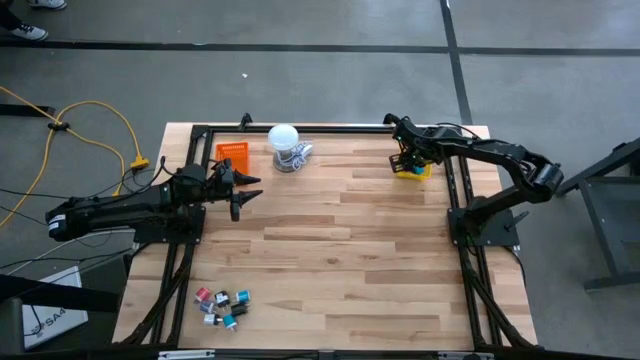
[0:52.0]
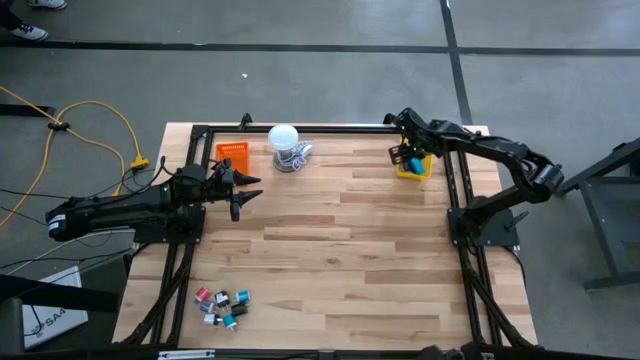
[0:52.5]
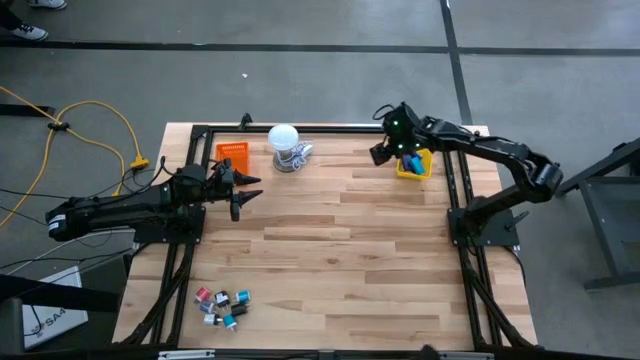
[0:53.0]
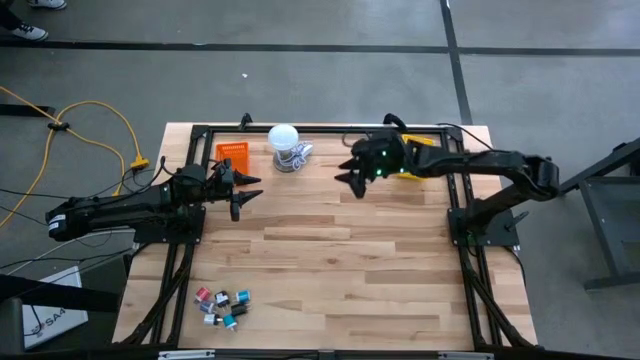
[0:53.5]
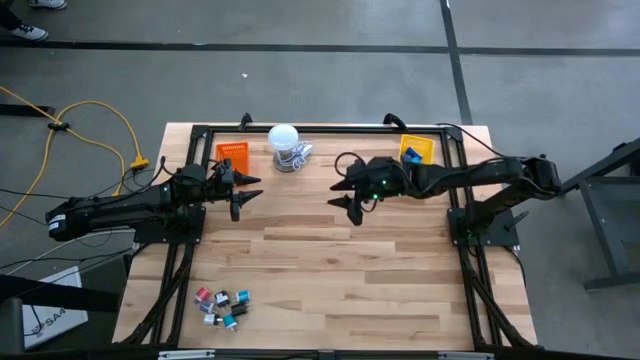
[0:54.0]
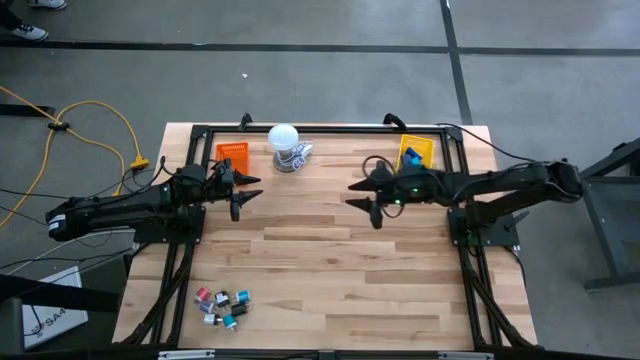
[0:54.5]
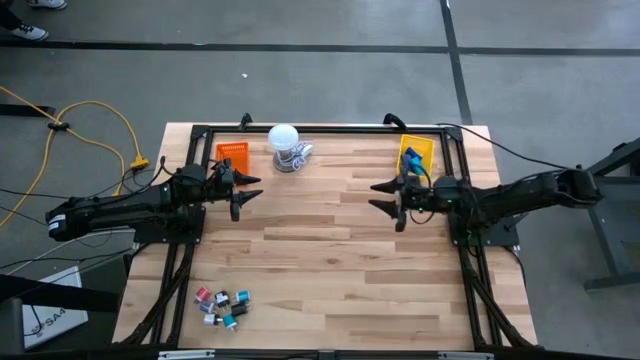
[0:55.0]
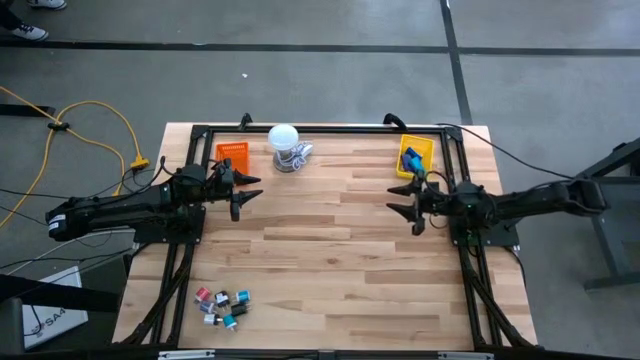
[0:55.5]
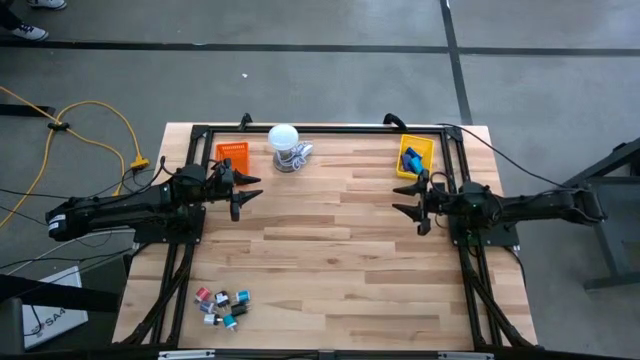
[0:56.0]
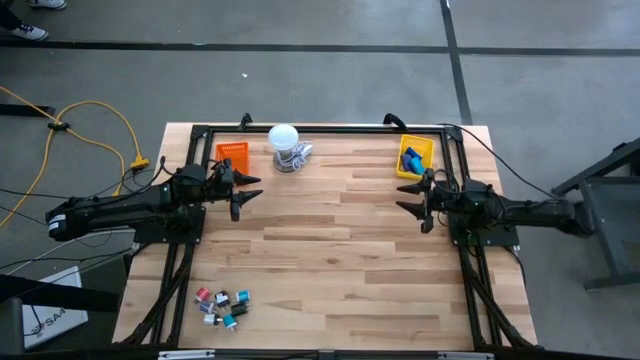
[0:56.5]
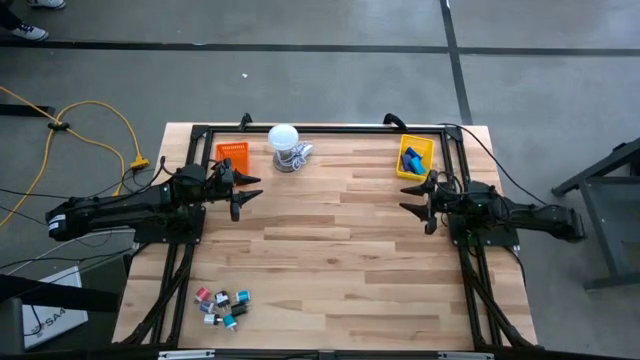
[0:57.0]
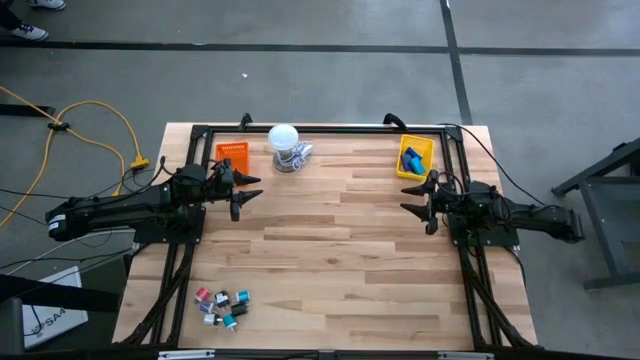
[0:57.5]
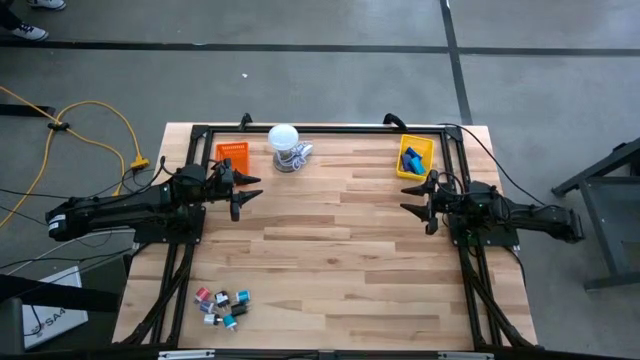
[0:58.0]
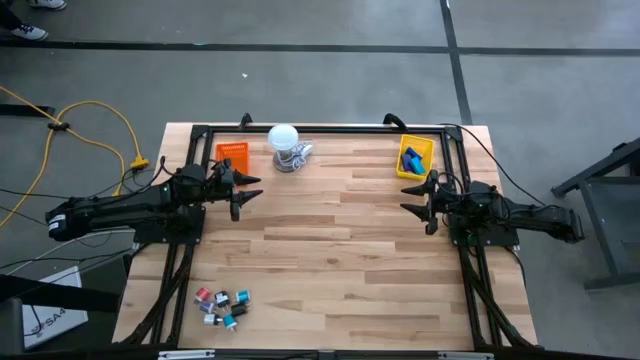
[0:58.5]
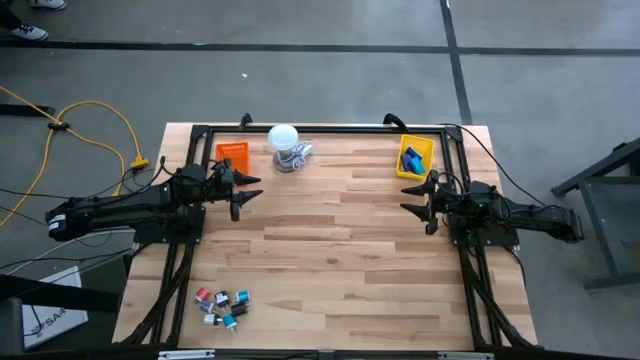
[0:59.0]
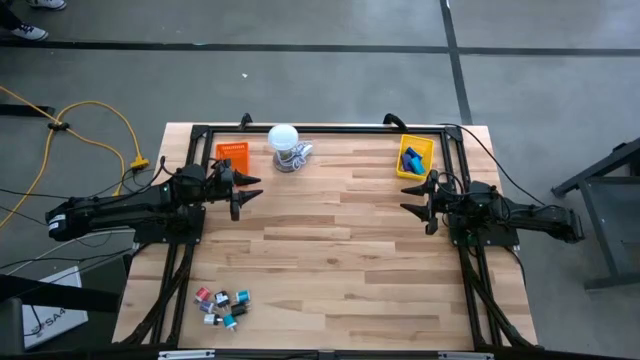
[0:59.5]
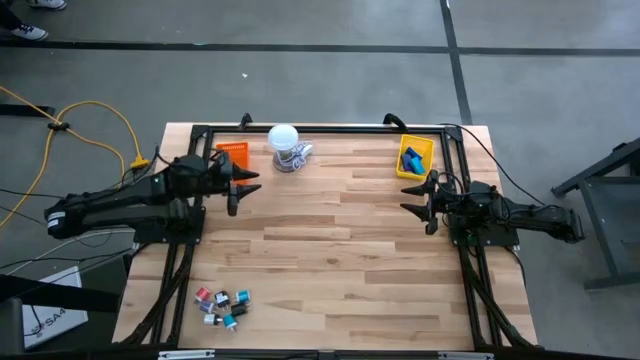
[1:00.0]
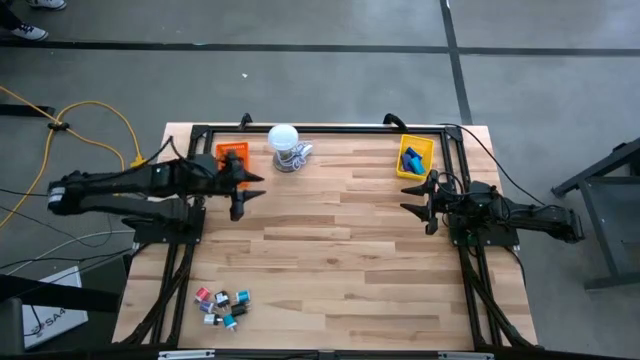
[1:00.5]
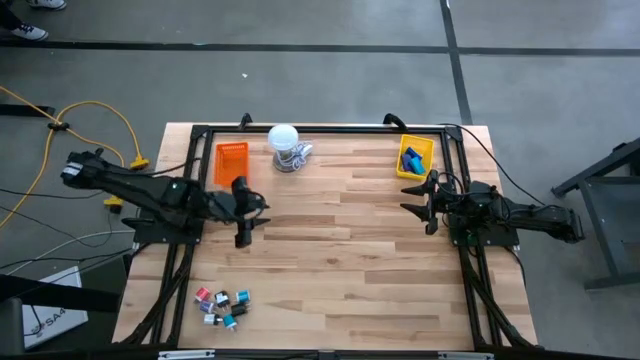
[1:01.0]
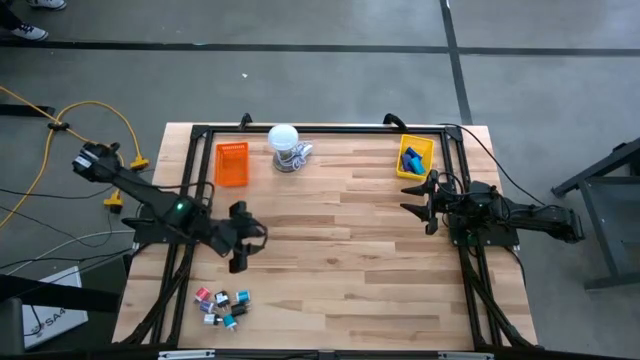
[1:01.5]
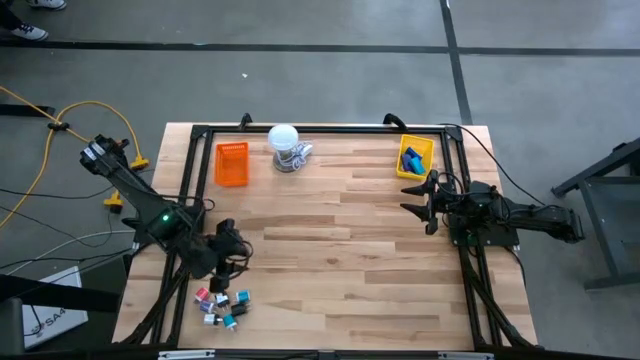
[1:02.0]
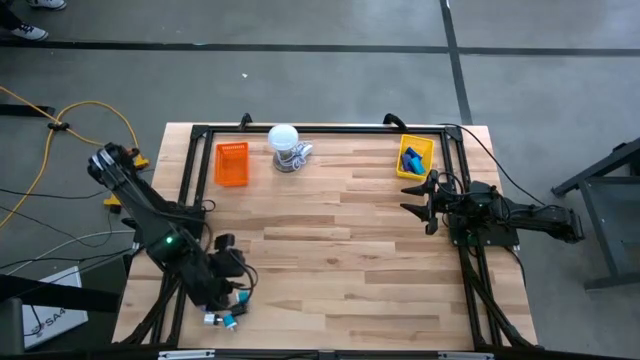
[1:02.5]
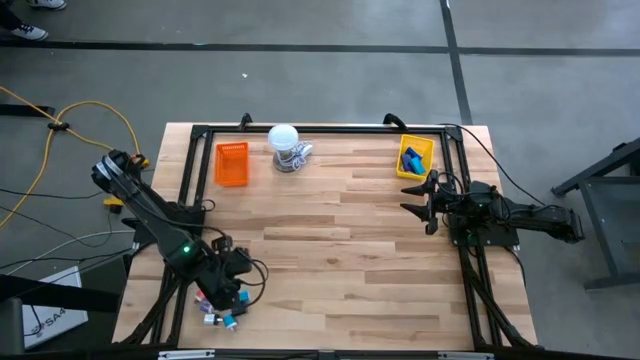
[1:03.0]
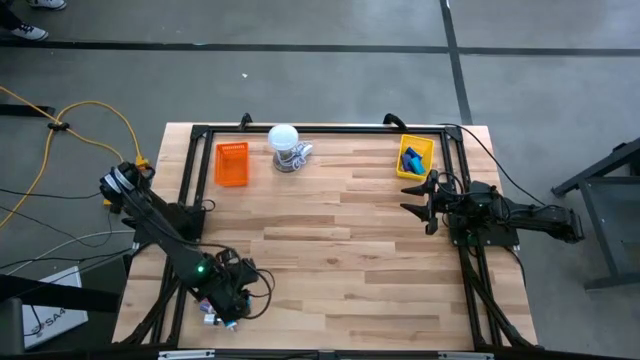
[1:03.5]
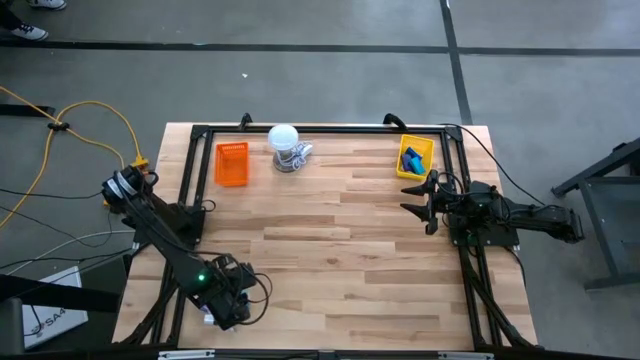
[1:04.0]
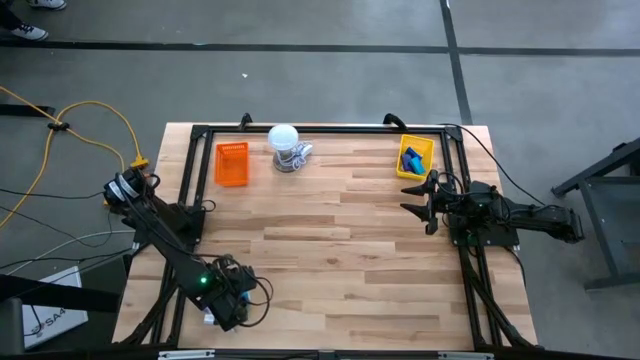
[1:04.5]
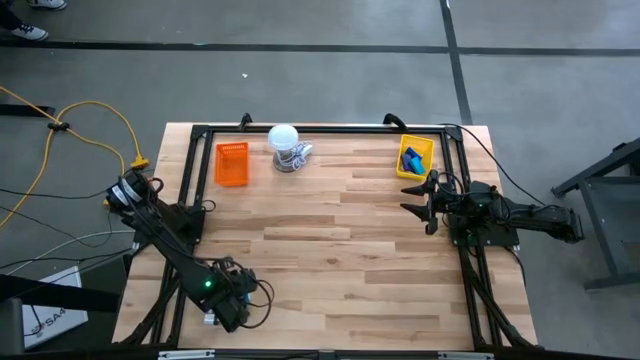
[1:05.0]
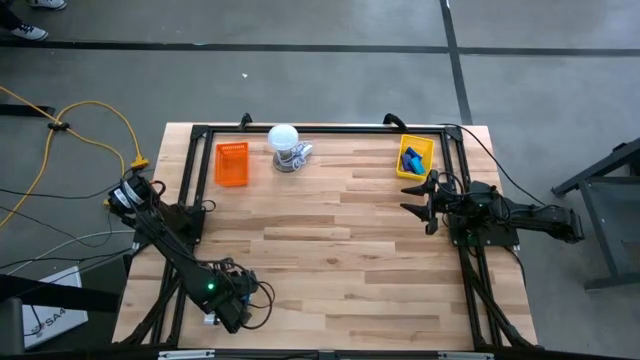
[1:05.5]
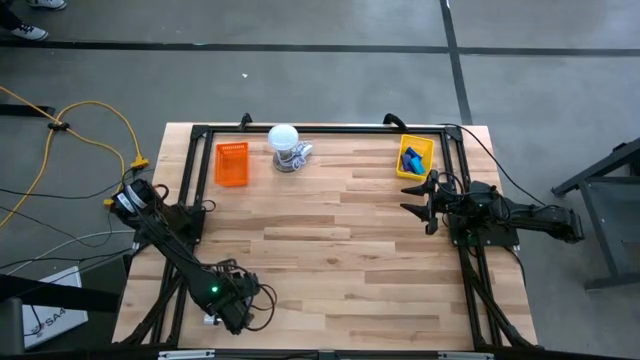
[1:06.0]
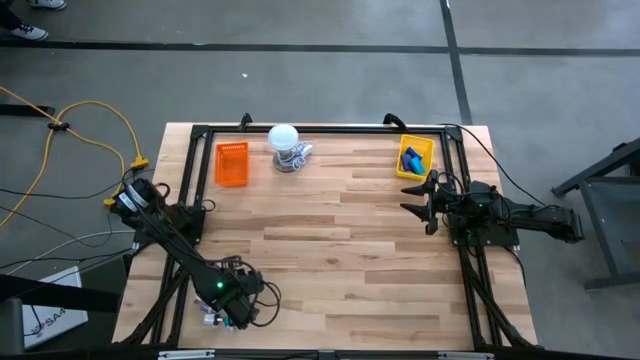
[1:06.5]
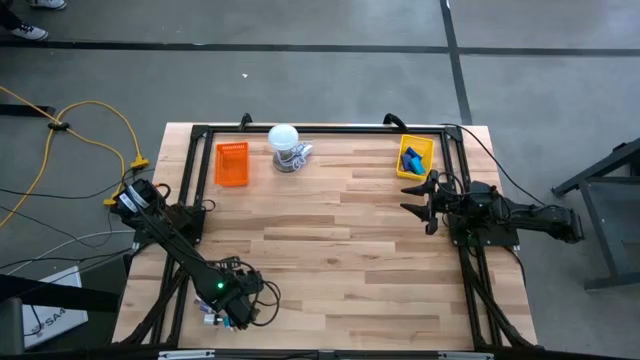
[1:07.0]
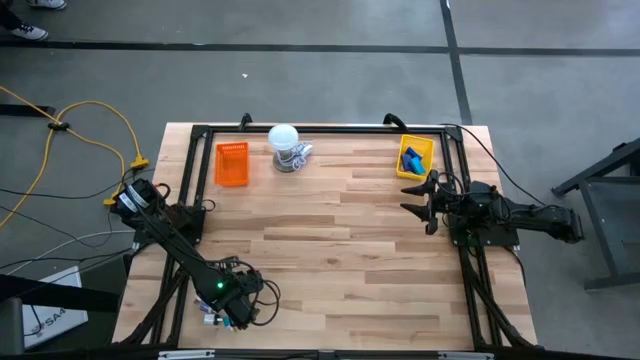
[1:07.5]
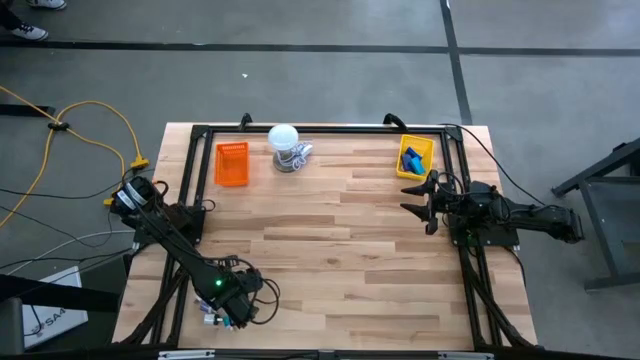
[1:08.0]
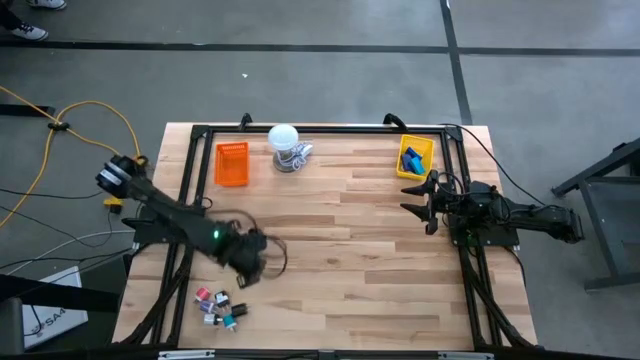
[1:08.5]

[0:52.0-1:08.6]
Task: Pick & Place Office items
Put the top light blue charger adapter into the orange basket

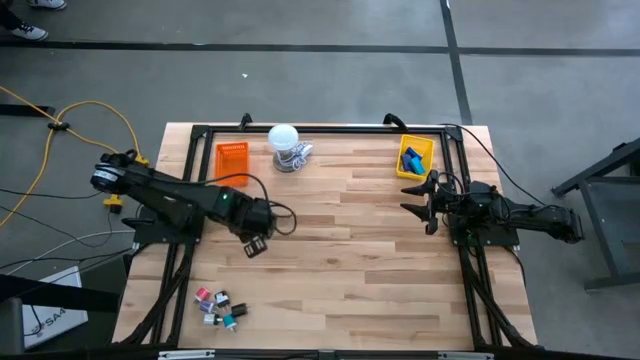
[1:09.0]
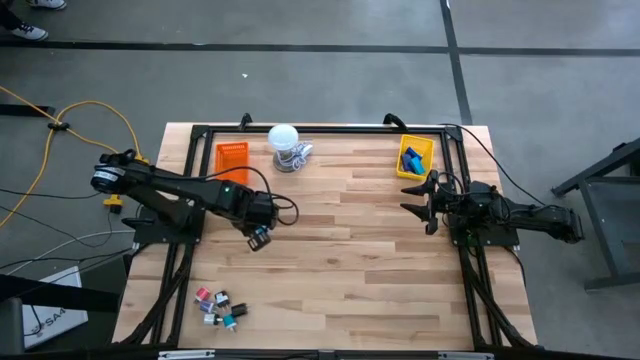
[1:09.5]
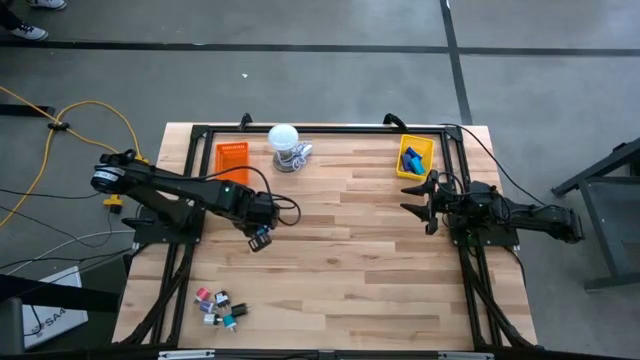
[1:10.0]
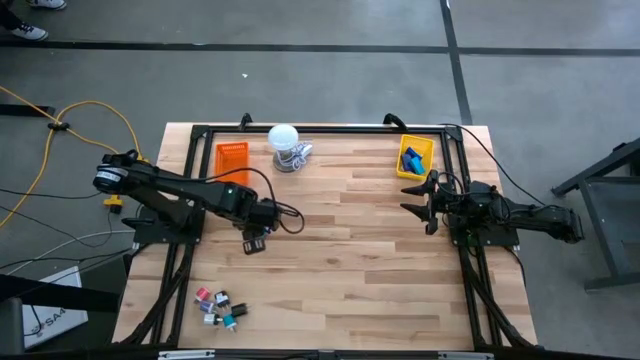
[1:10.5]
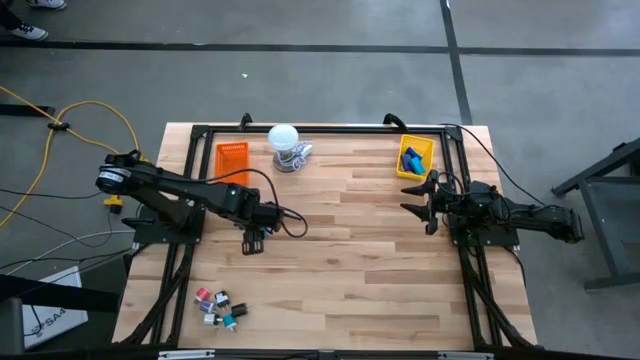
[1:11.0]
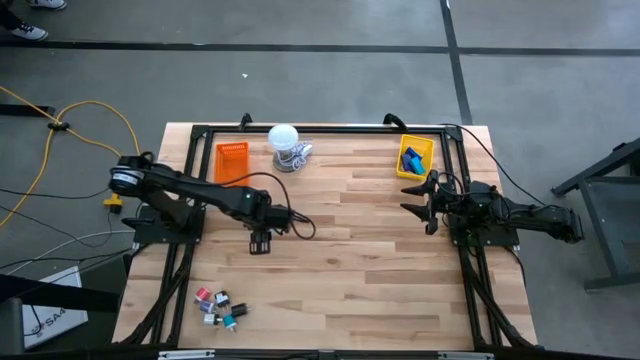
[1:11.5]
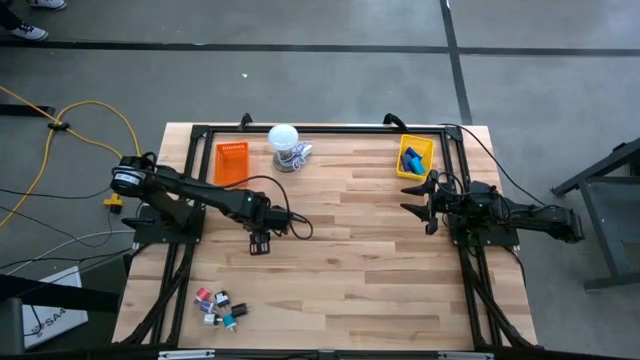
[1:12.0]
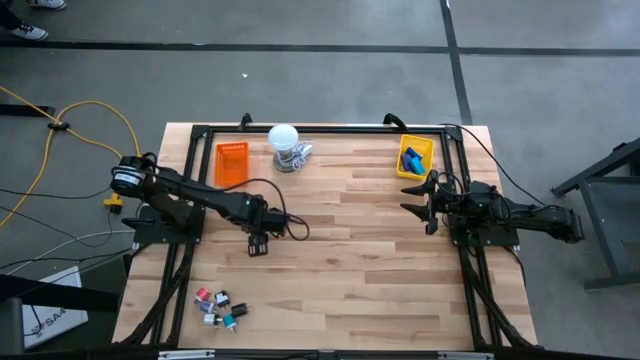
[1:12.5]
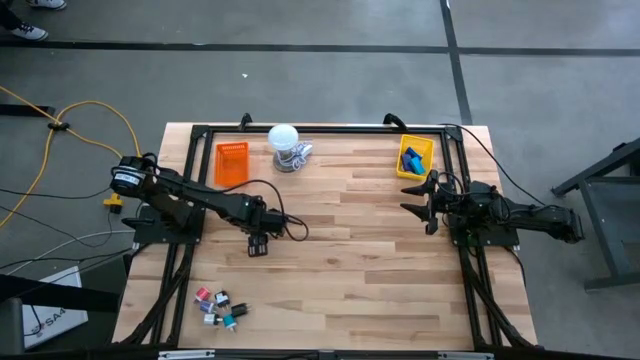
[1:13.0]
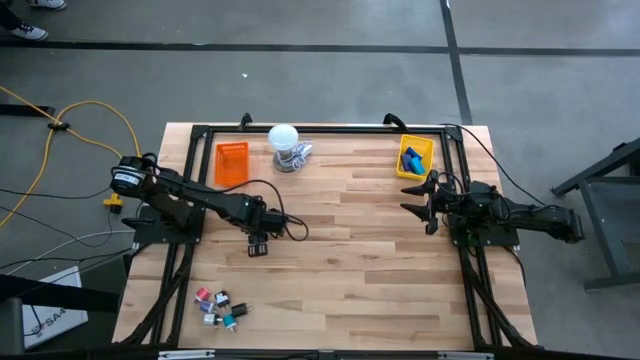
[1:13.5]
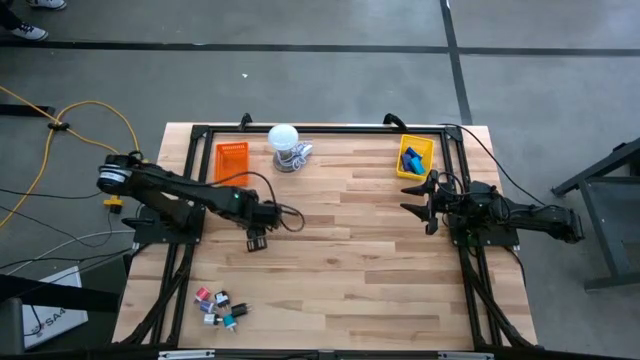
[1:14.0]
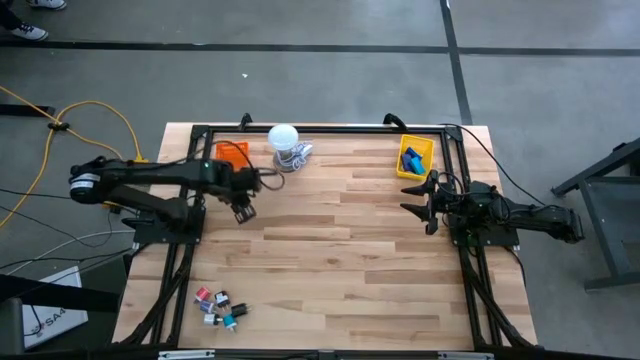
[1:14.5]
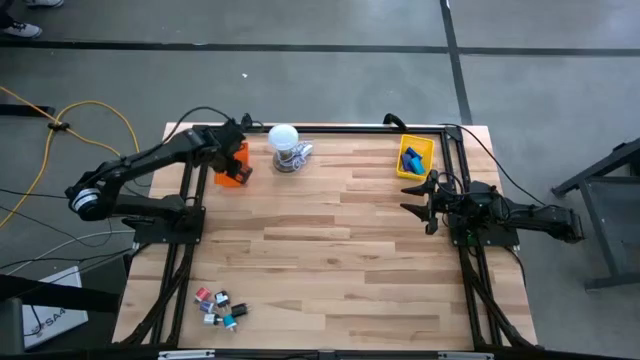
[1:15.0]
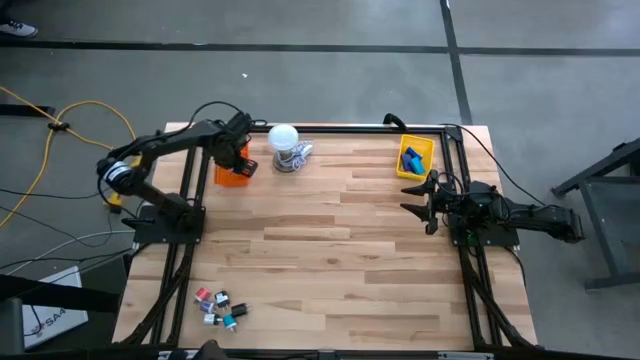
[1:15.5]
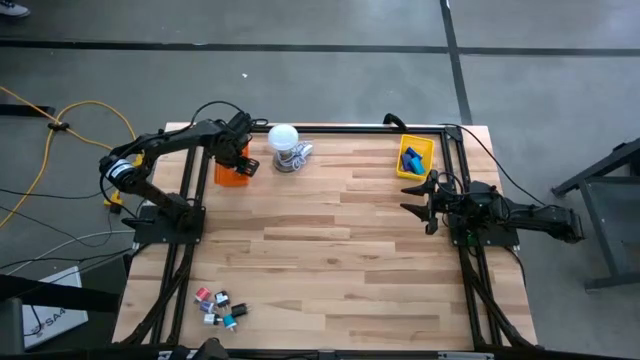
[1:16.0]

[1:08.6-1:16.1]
Put the light blue charger adapter into the orange basket
